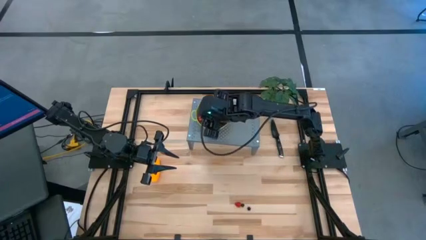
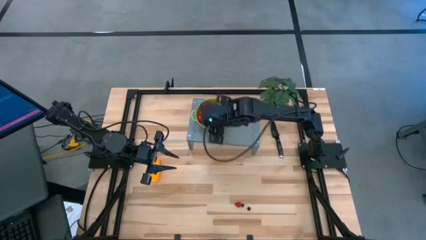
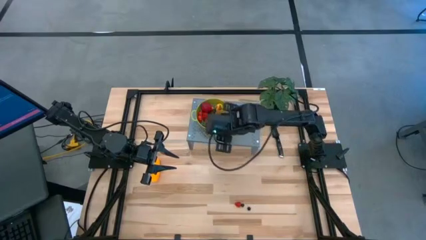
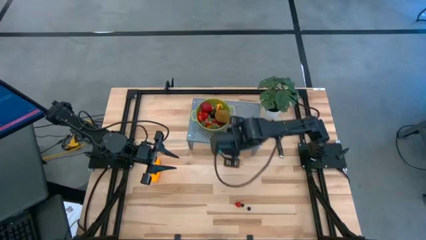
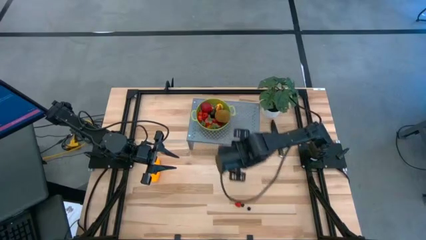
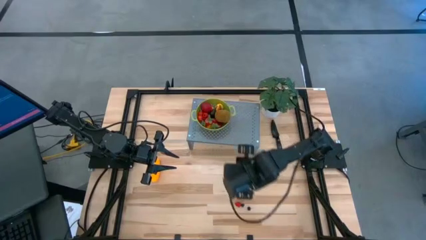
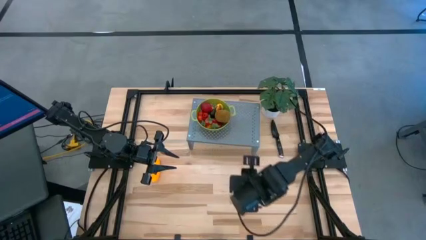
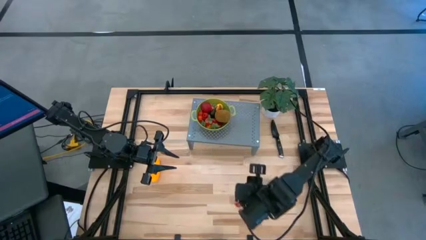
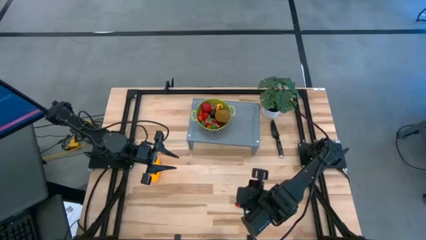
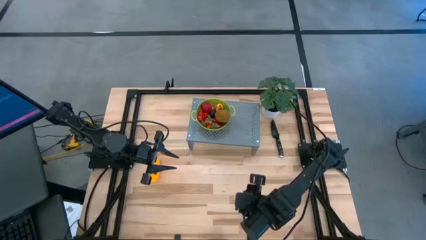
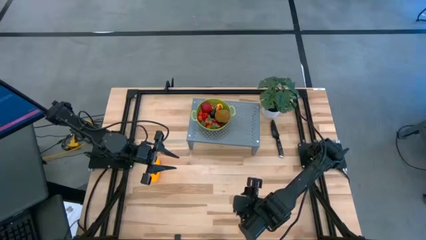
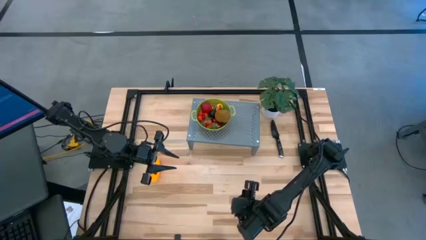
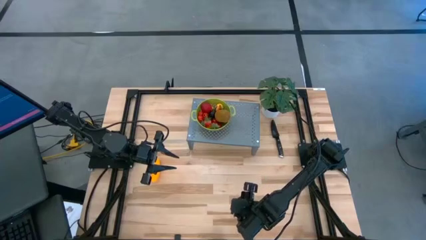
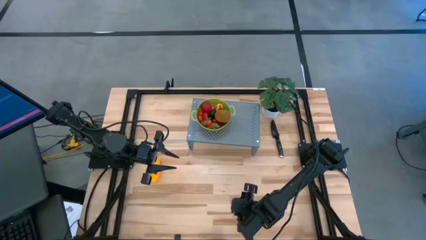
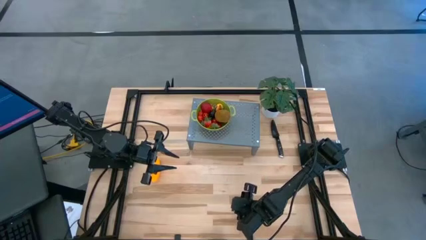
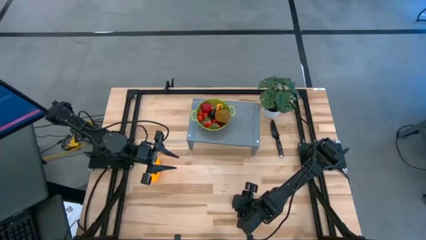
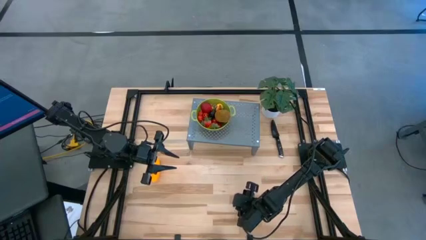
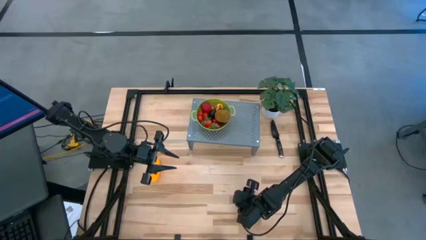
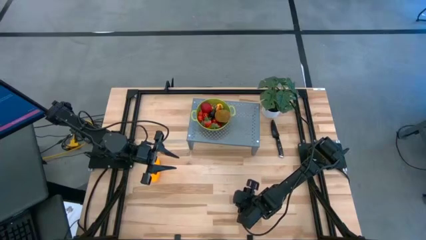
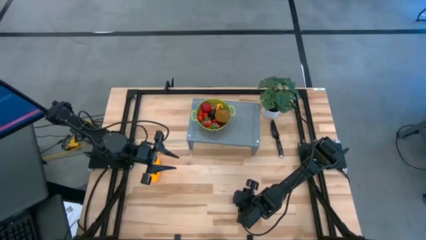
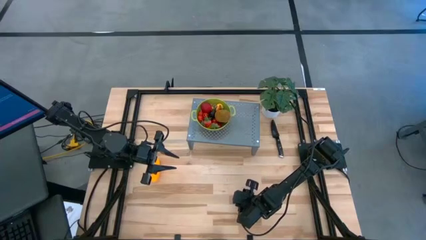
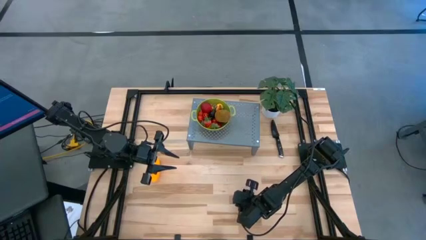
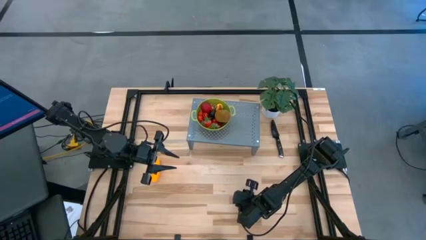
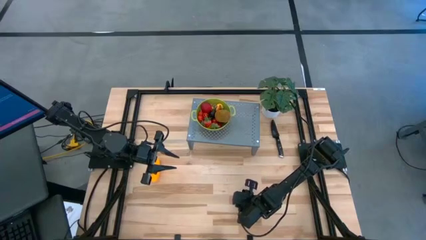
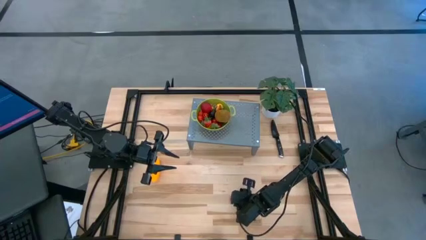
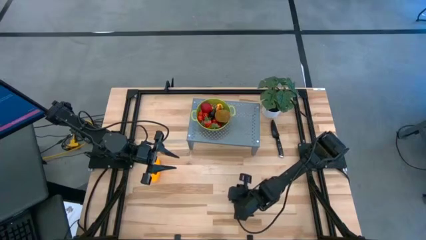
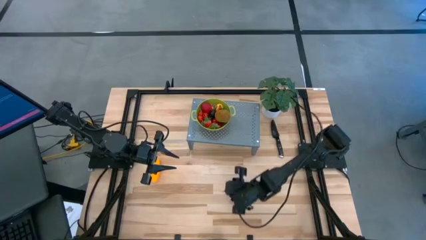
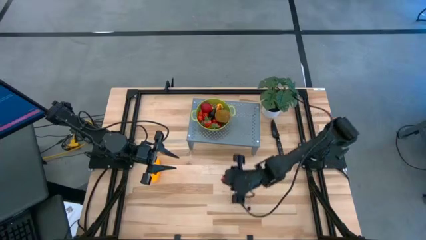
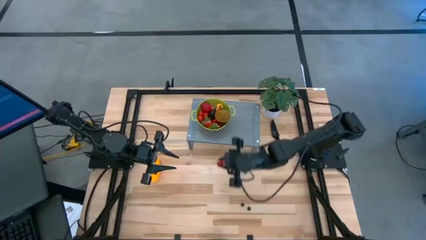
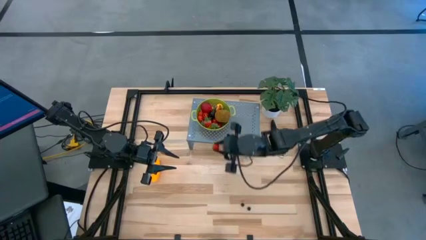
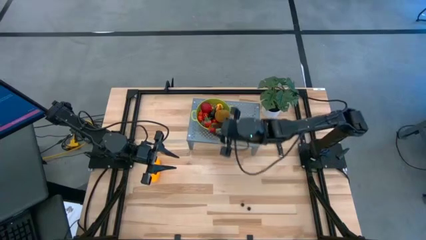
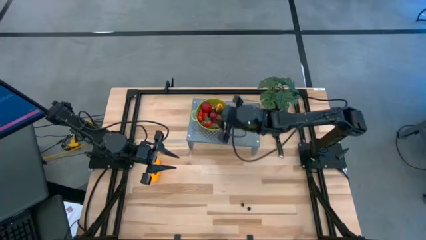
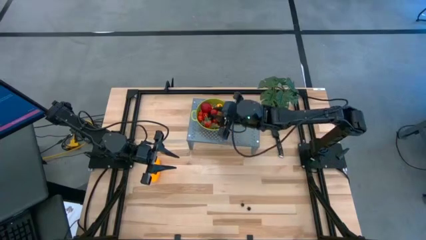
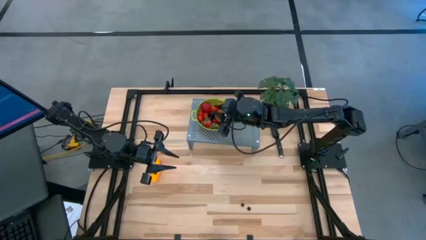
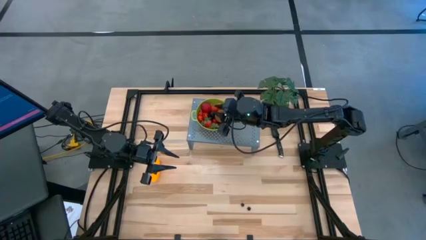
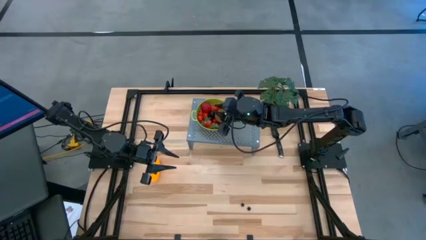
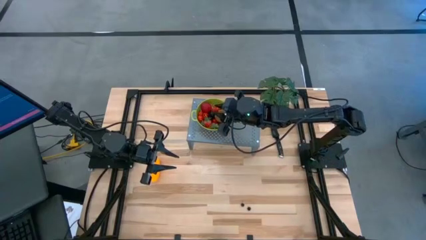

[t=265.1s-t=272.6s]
Task: Pick & Place Fruit
Put the red raspberry into the green strainer bowl on the shelf

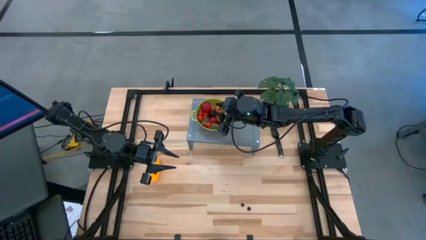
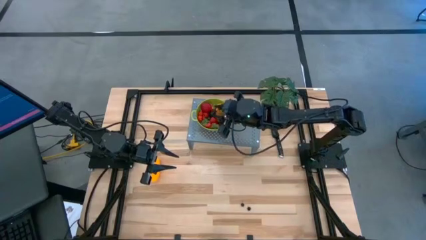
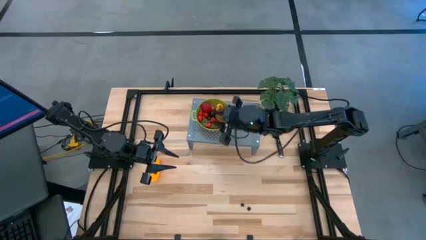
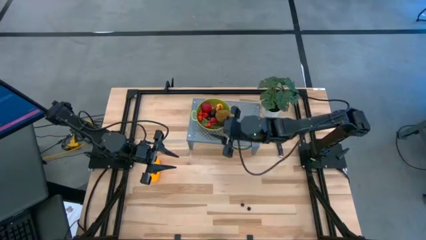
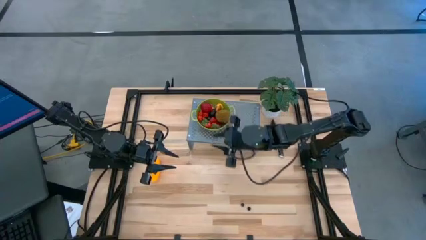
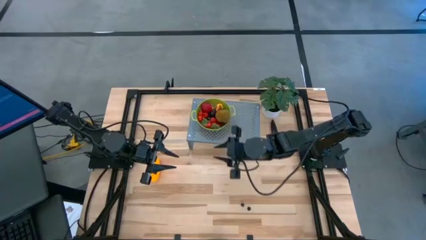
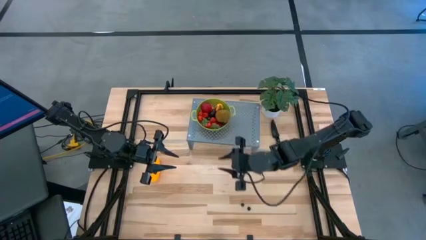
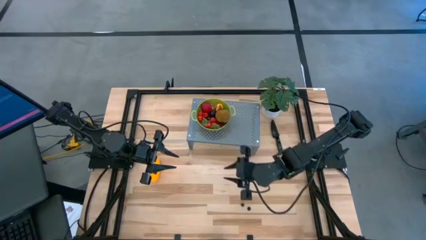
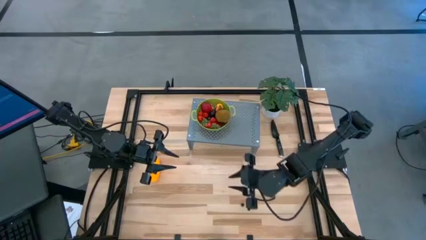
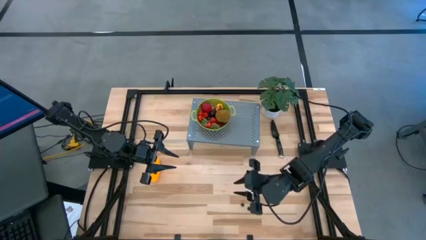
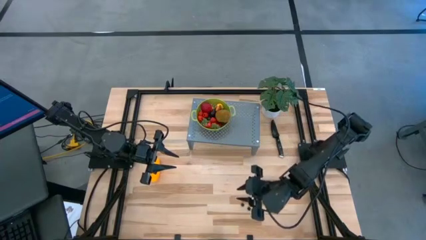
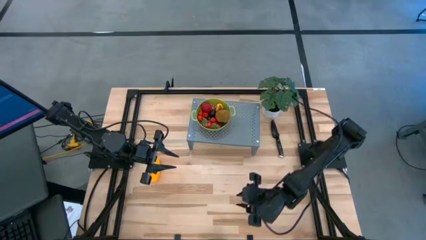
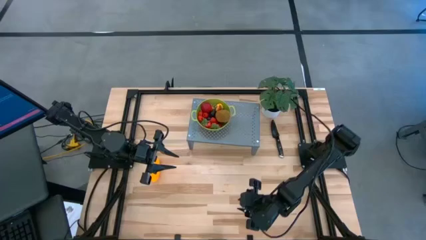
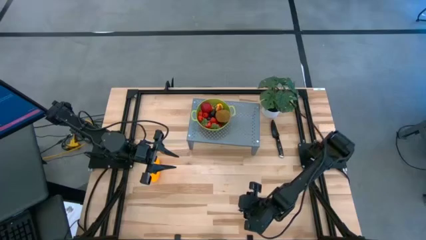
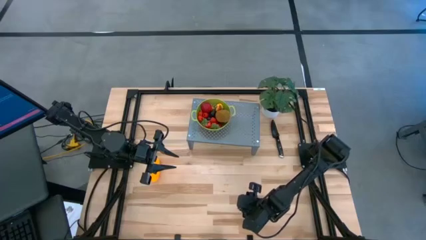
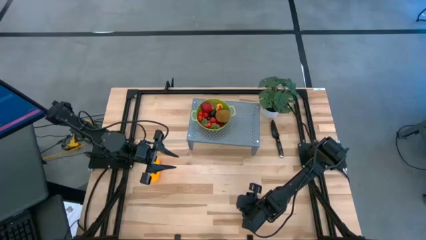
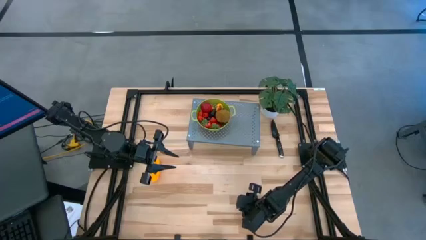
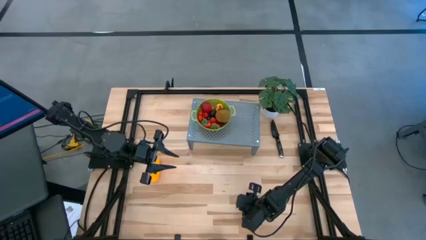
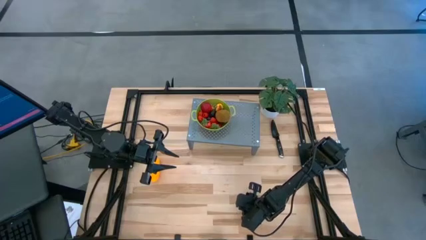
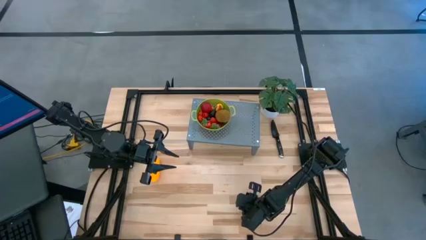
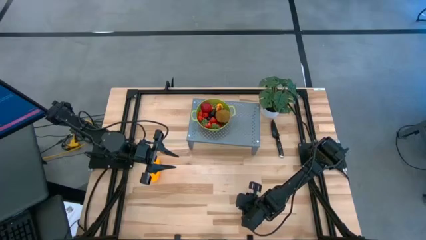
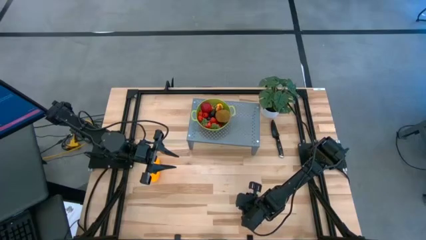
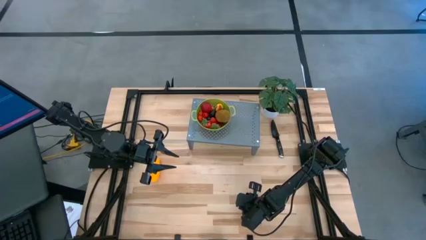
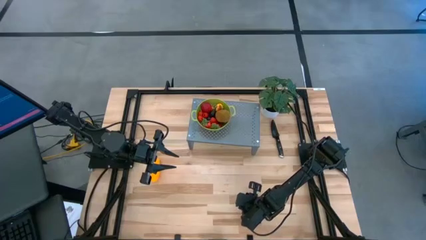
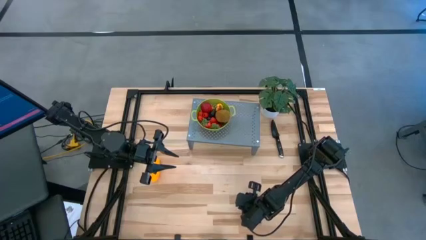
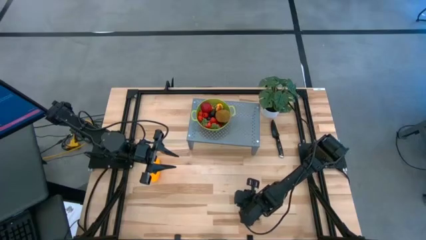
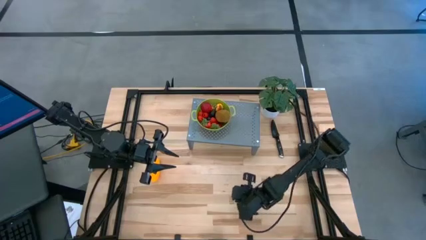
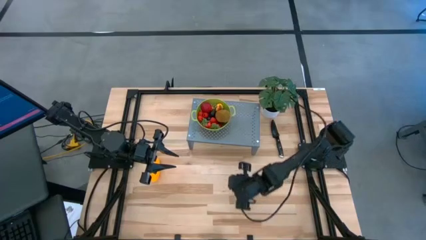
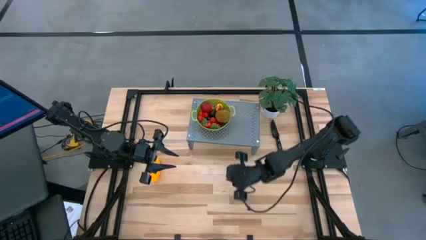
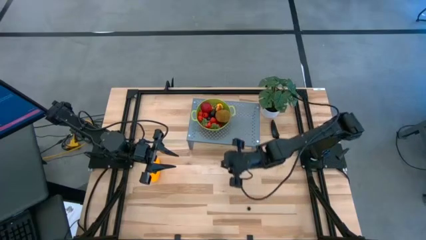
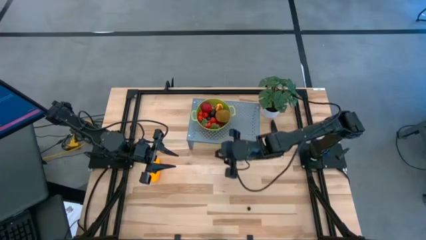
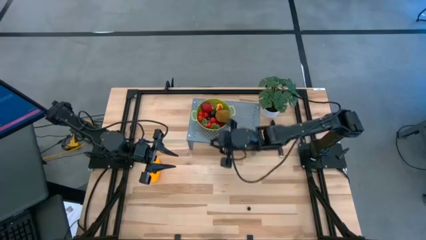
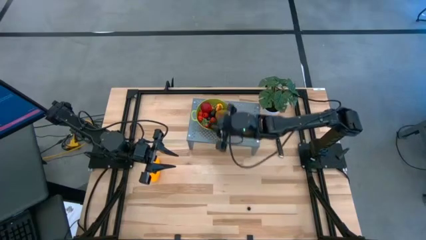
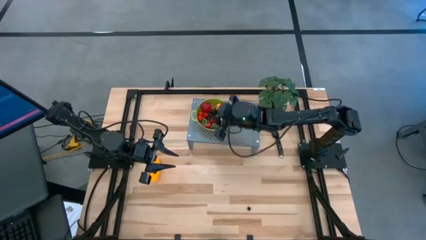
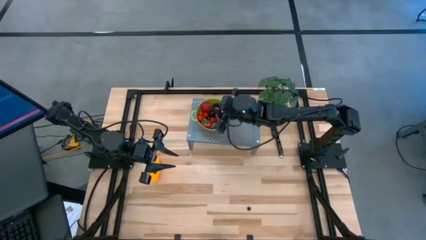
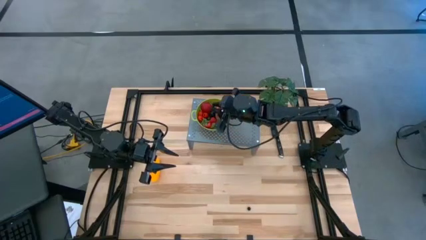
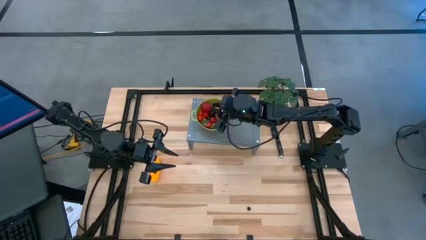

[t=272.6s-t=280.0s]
Put the blueberry into the green strainer bowl on the shelf

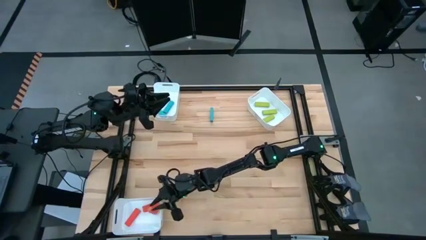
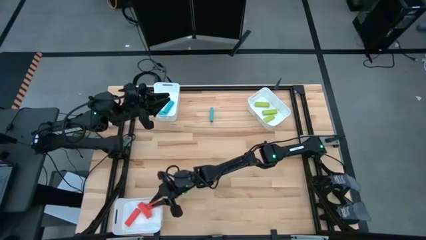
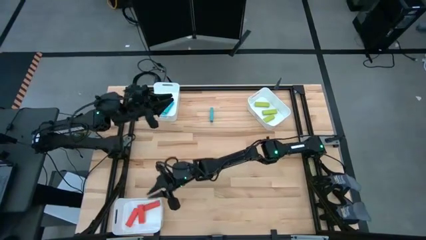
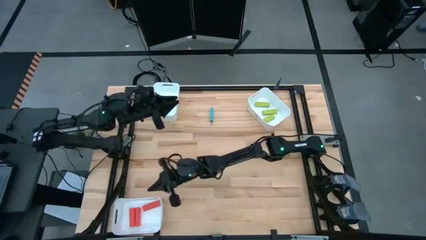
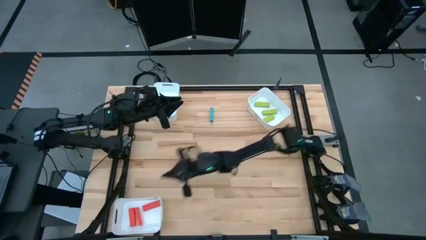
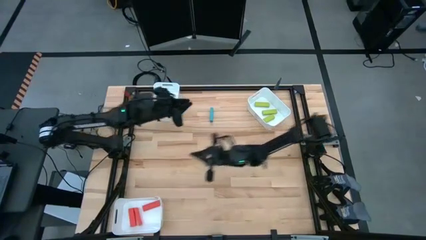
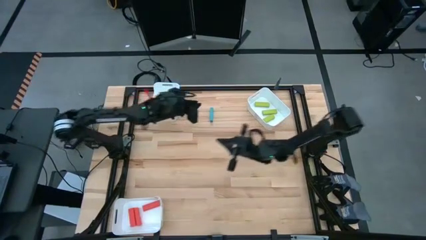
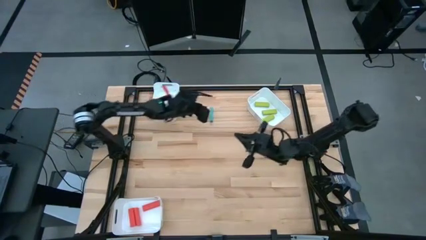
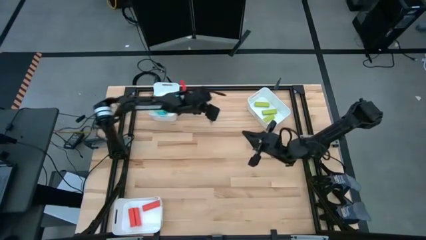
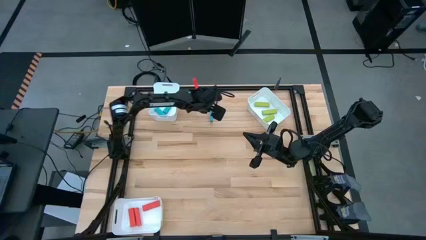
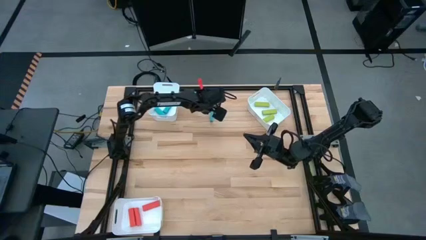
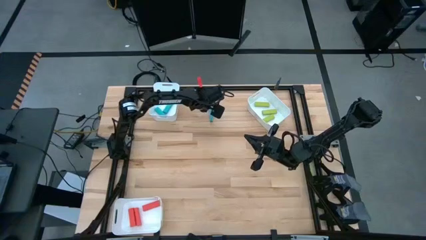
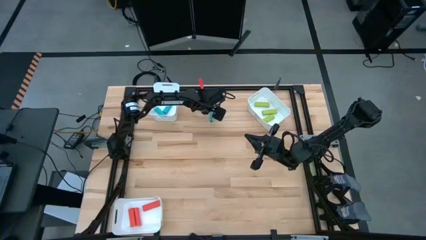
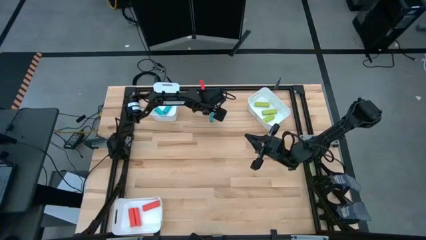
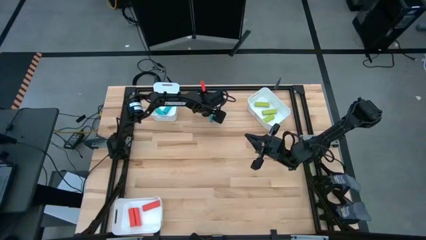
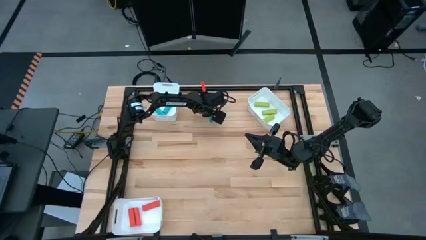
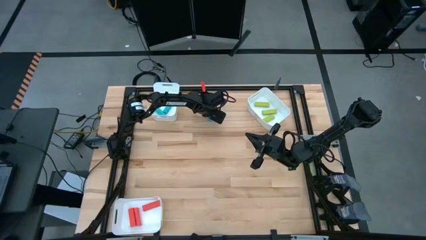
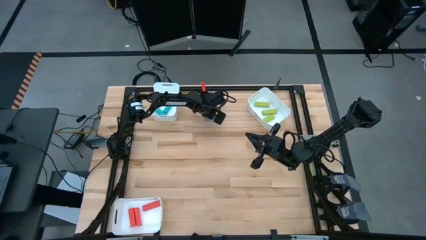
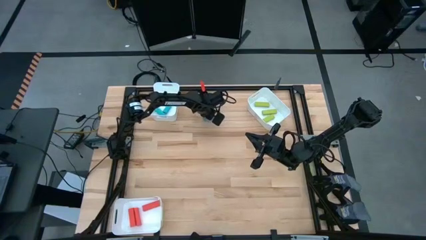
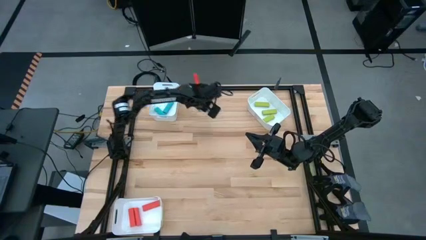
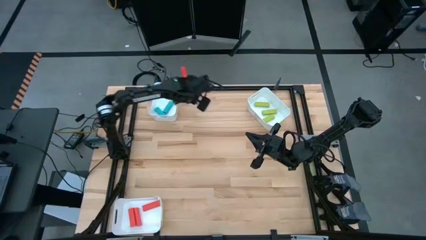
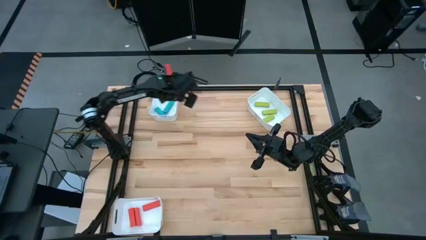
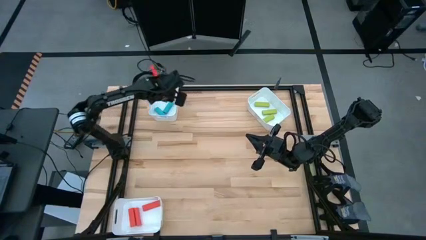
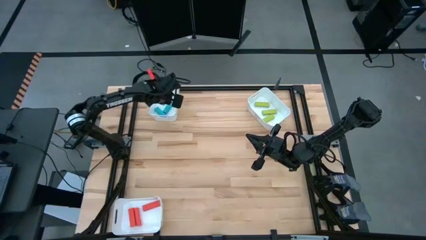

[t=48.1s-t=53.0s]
Task: Sort blocks
Put the blue block into the top left white bin
